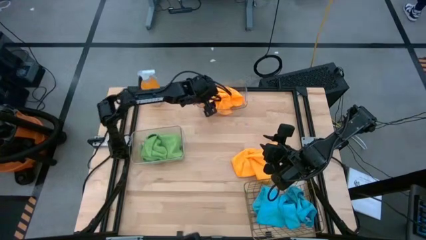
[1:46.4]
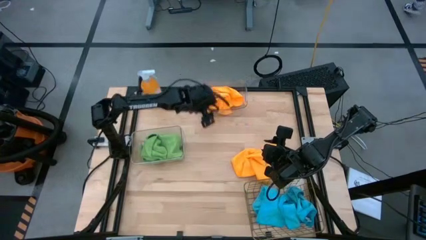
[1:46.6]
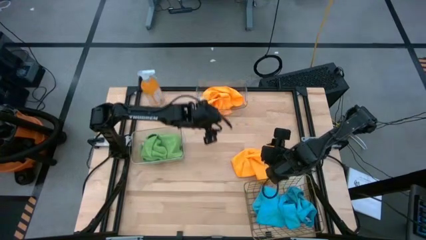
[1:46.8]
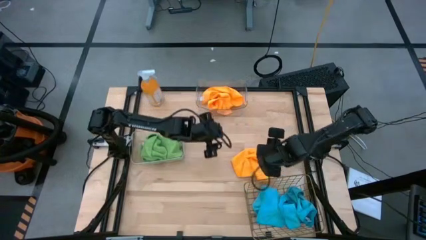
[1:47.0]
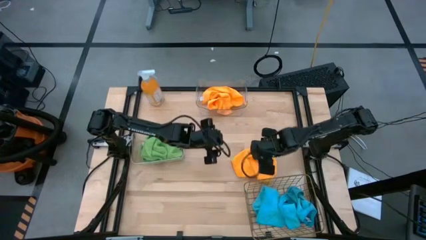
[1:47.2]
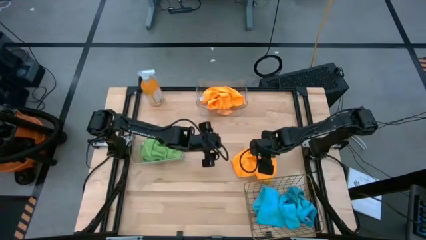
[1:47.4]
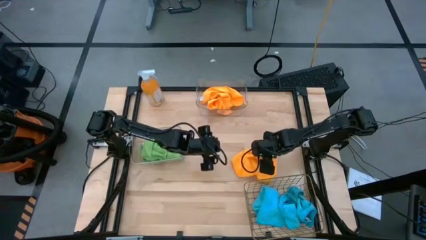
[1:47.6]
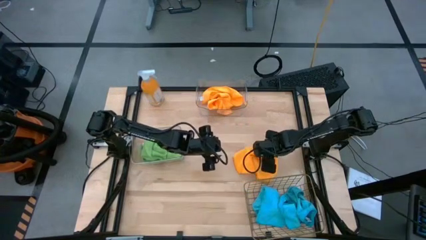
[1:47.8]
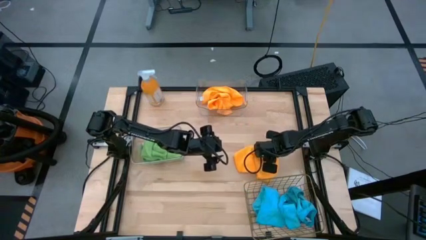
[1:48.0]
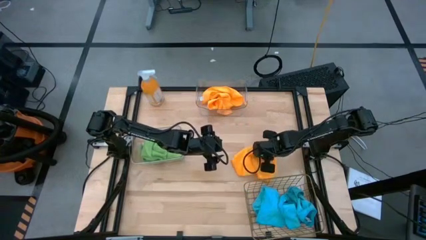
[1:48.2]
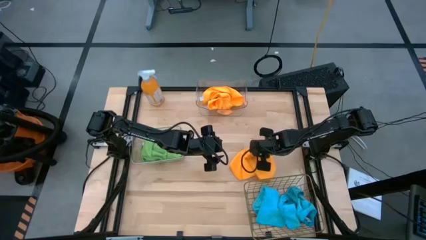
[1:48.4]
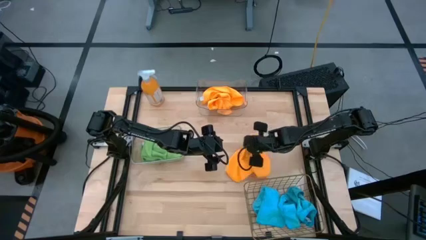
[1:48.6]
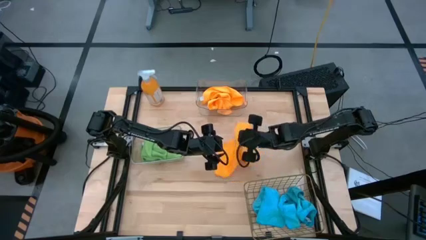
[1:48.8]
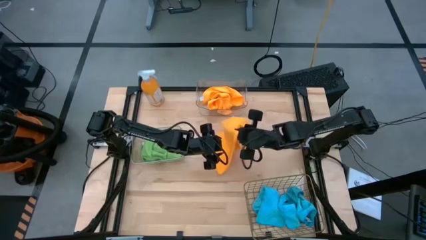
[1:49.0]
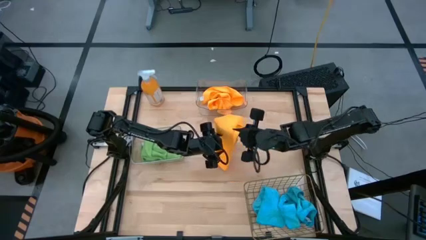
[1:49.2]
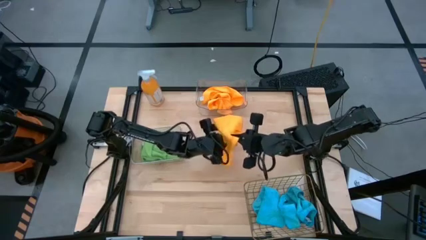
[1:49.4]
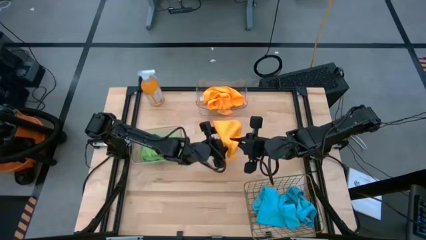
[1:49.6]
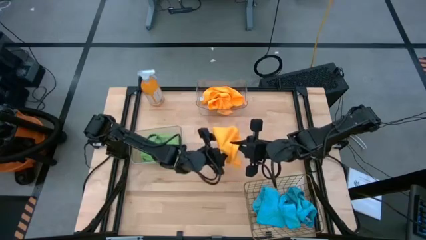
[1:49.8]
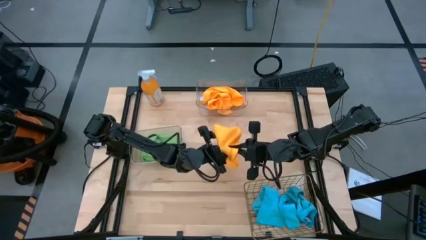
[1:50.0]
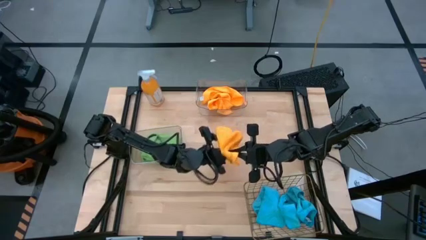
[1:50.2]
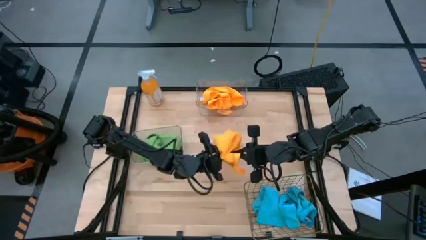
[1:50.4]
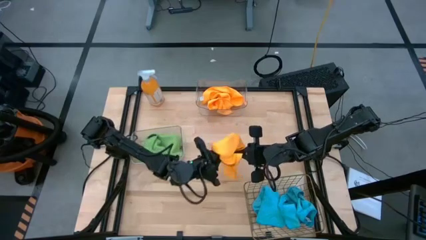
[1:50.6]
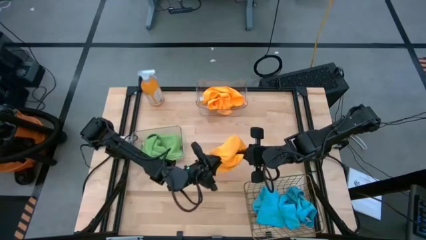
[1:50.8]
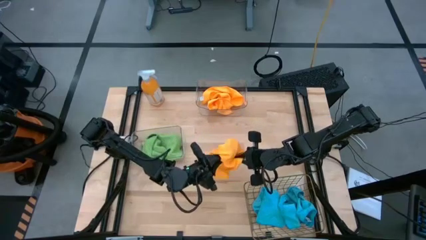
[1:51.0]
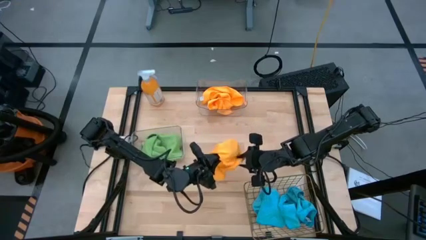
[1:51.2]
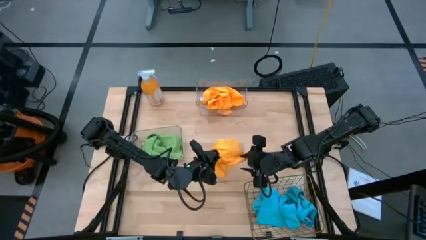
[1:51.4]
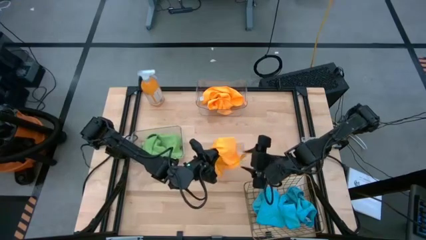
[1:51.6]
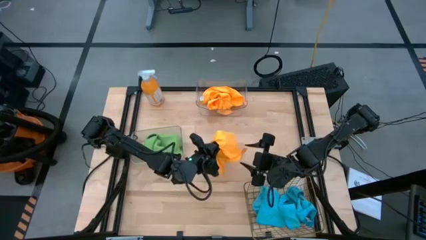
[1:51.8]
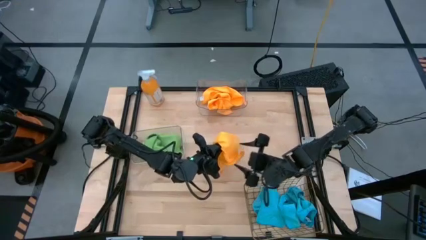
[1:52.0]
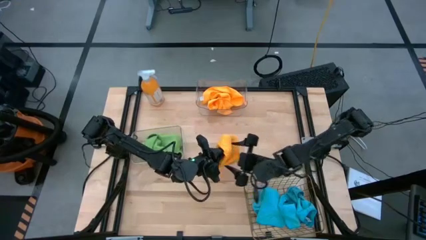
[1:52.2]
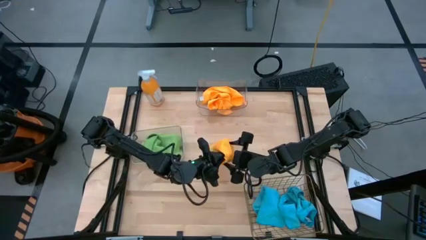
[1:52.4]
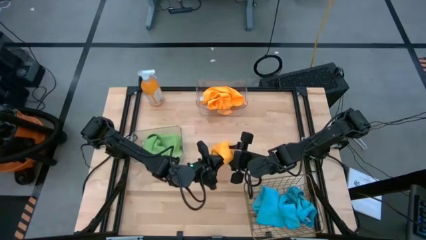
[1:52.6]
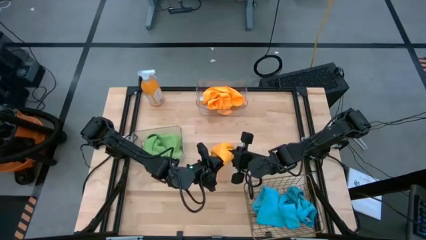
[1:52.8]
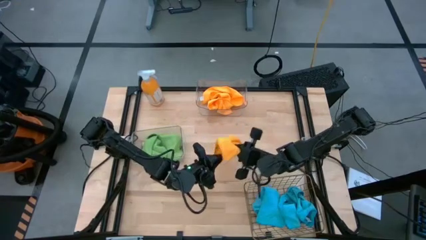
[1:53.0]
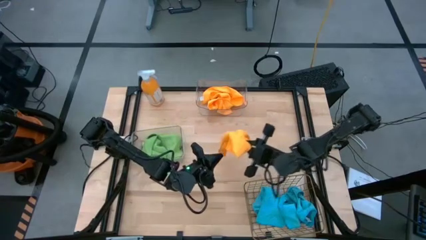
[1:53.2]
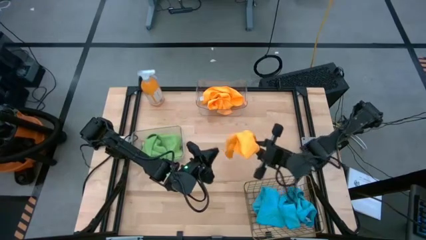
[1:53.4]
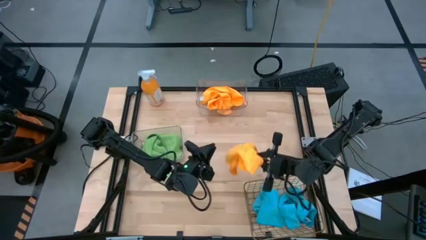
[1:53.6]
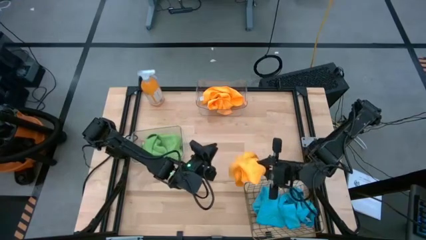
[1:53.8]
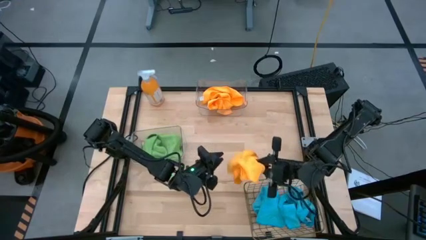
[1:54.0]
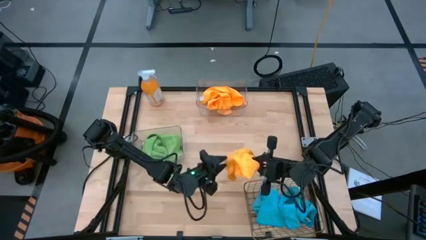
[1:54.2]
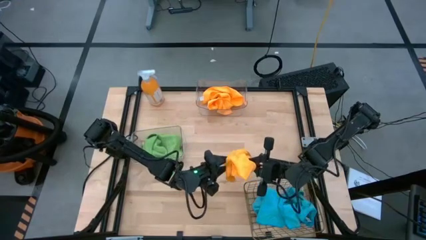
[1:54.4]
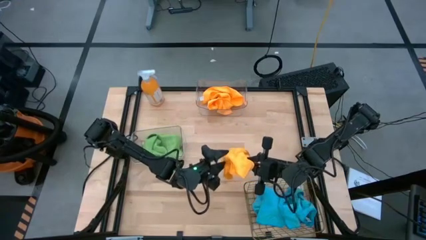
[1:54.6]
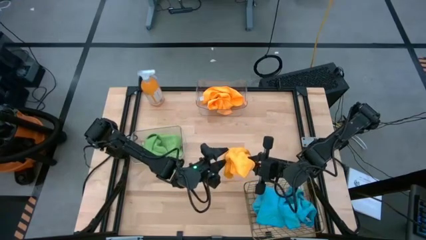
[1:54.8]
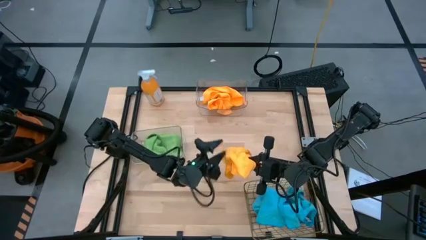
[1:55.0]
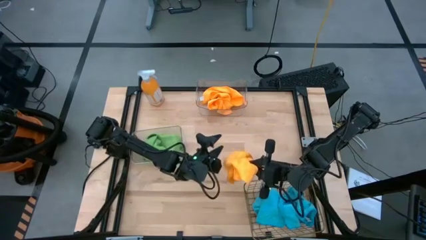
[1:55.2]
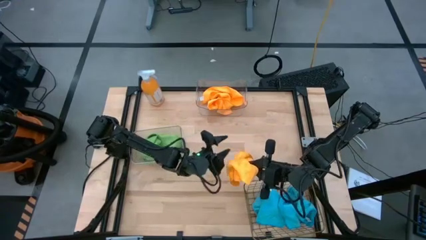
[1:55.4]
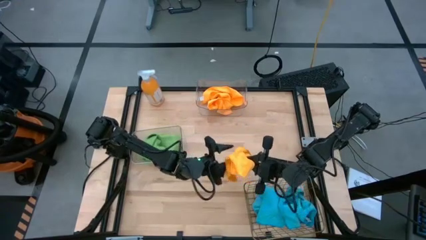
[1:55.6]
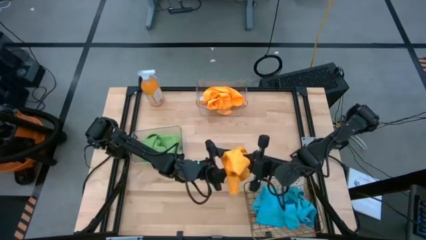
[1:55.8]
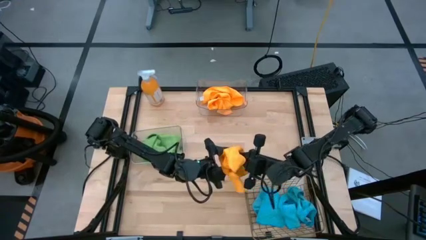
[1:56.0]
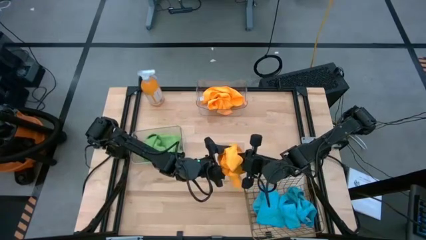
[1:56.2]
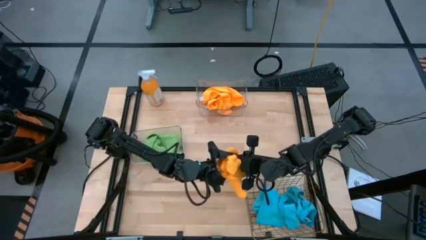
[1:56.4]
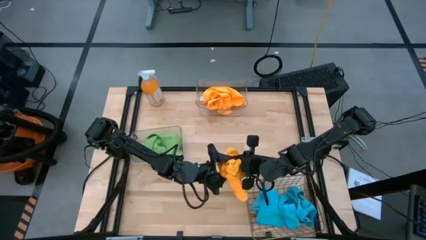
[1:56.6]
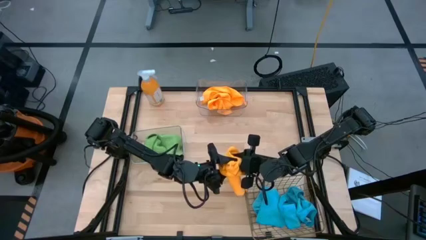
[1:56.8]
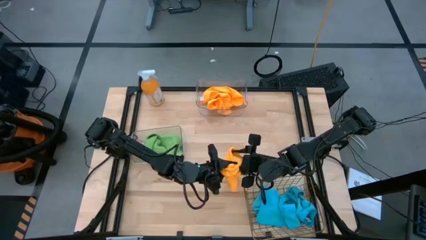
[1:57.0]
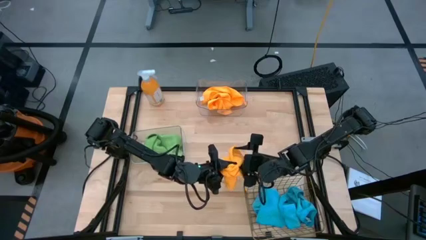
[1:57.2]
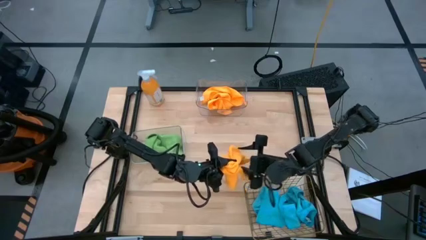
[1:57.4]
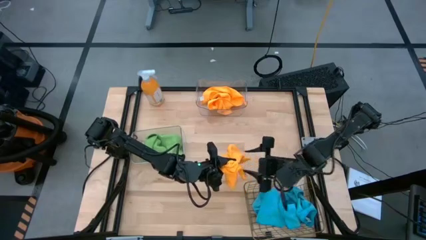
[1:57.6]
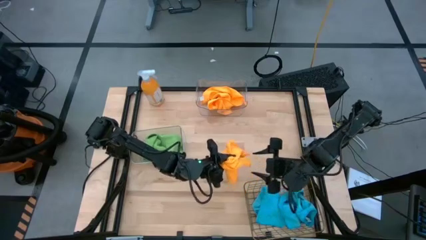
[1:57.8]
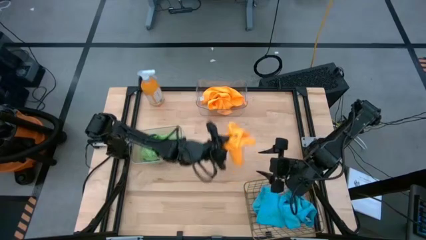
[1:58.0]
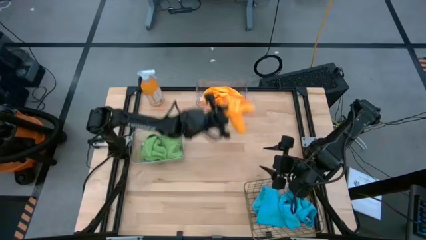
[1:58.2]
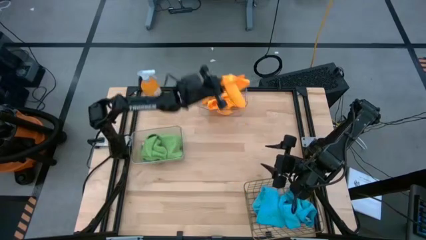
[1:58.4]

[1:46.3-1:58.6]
Task: Sort microfiber towel by color & place in baskets
Put the orange microfiber towel into the top transparent bin

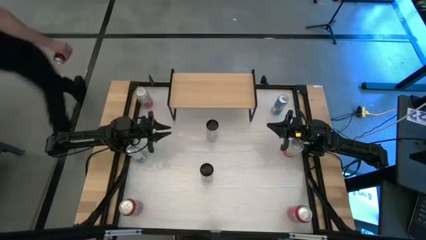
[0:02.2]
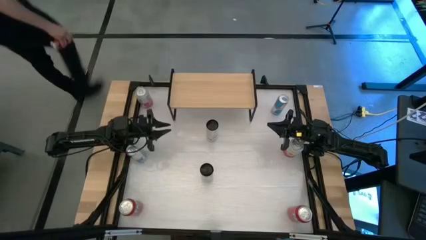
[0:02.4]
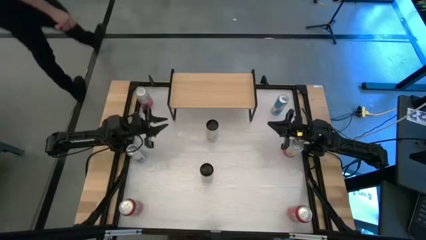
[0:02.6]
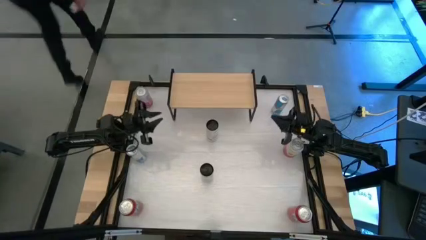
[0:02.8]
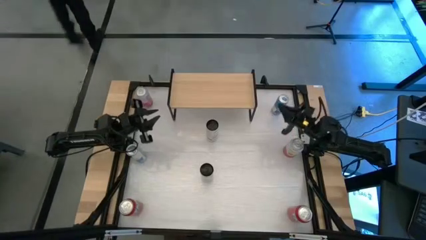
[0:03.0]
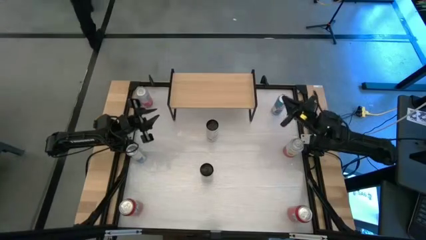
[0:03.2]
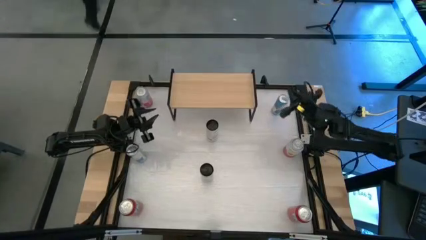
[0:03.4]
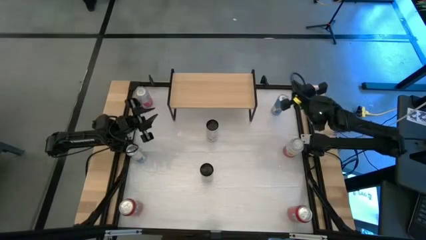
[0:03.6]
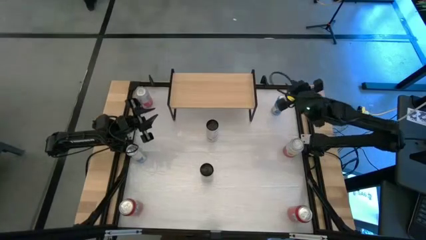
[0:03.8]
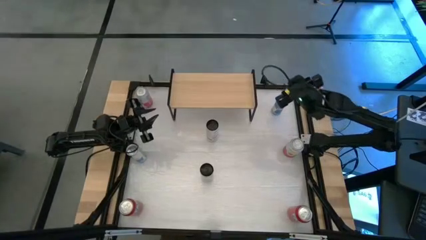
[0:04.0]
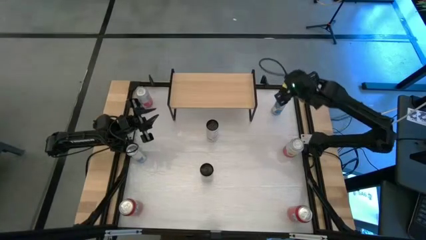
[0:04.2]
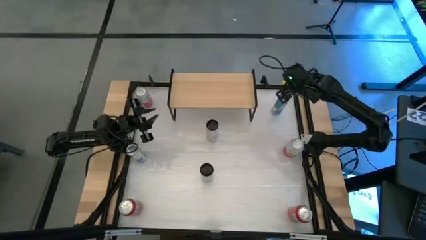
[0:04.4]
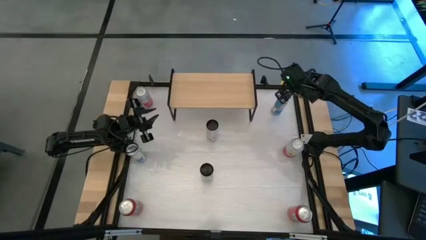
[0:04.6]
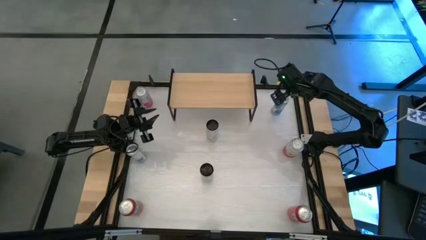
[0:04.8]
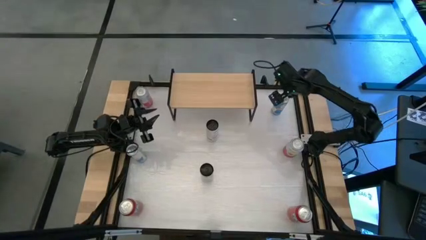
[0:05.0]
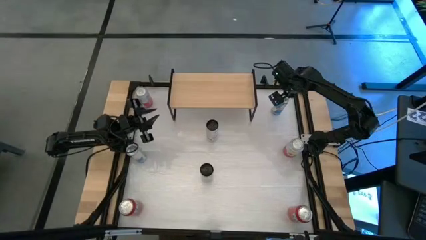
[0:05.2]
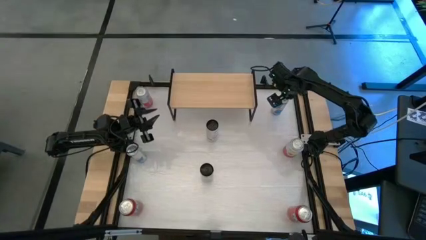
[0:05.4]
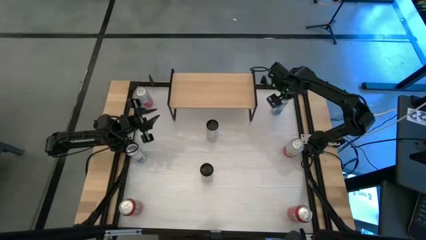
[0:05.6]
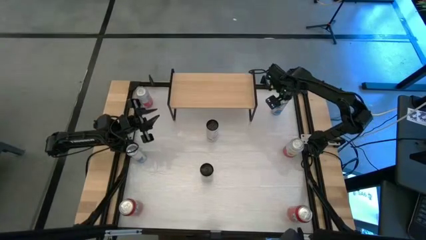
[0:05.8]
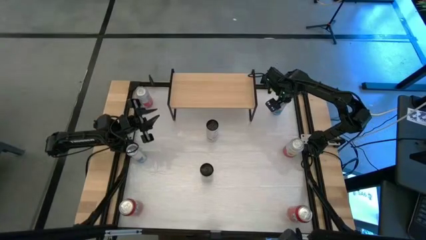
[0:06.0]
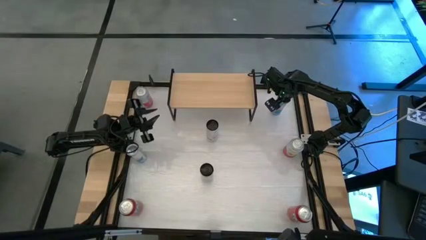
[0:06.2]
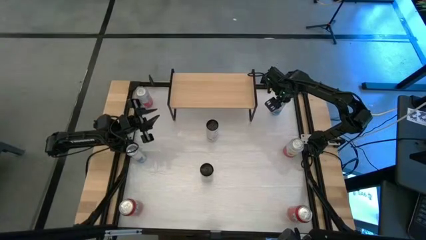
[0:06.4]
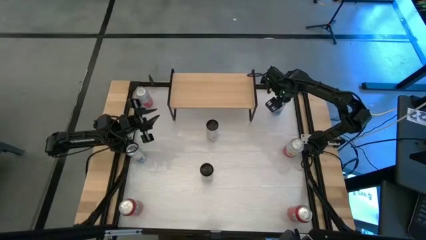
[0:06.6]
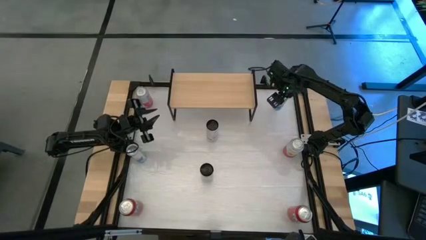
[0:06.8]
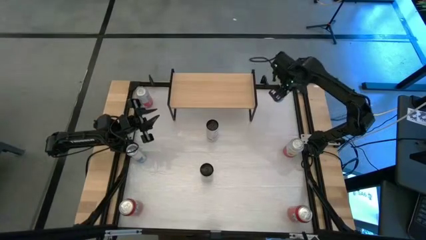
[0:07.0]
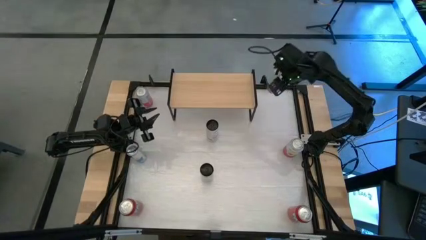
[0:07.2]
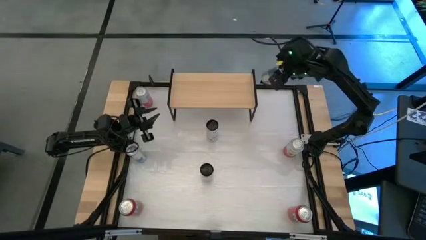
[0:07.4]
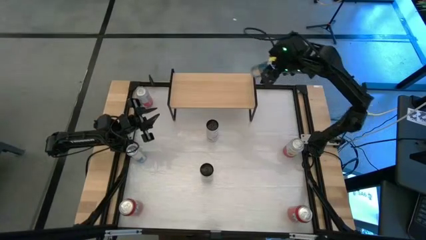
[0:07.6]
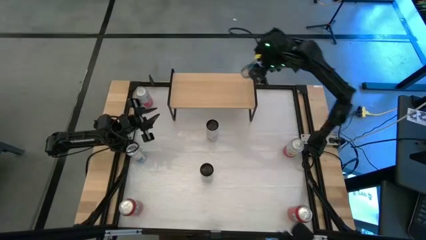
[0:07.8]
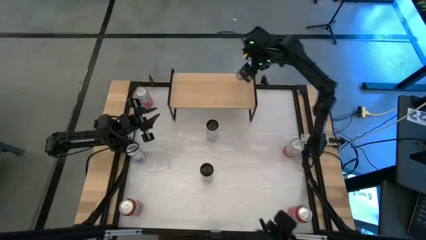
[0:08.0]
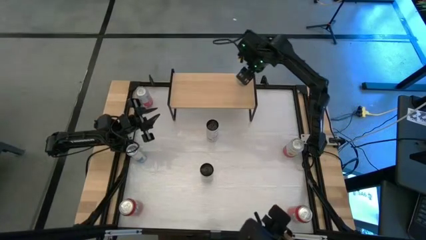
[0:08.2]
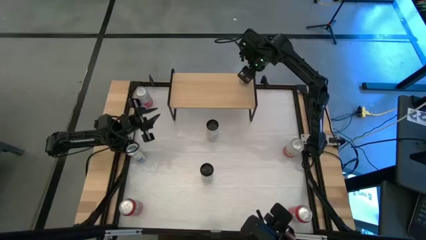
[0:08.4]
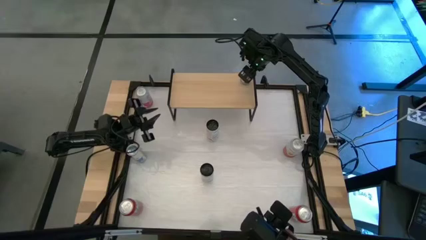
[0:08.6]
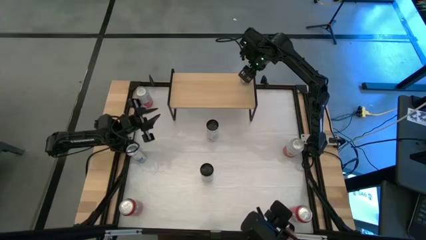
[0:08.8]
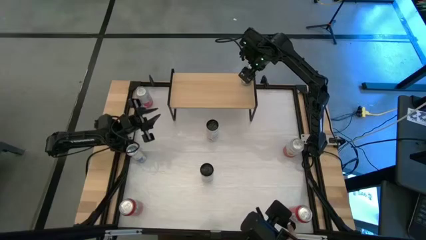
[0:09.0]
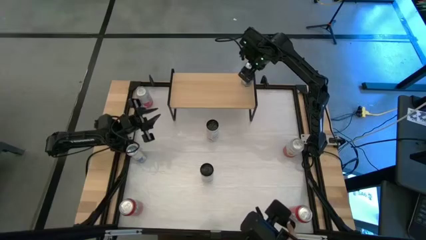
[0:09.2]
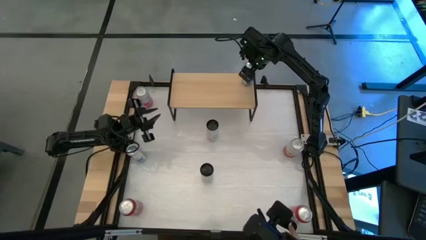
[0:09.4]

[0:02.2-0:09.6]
Task: Place canned beverage on shelf
Put the top blue soda can on the shelf
